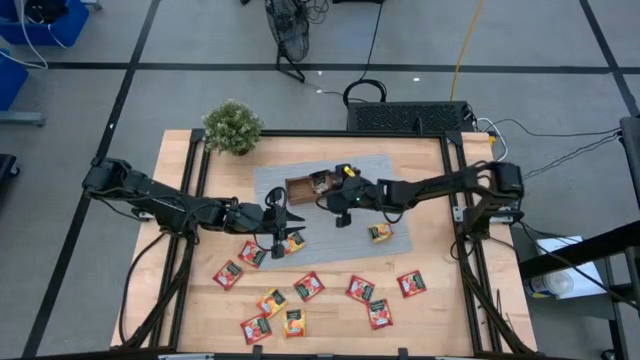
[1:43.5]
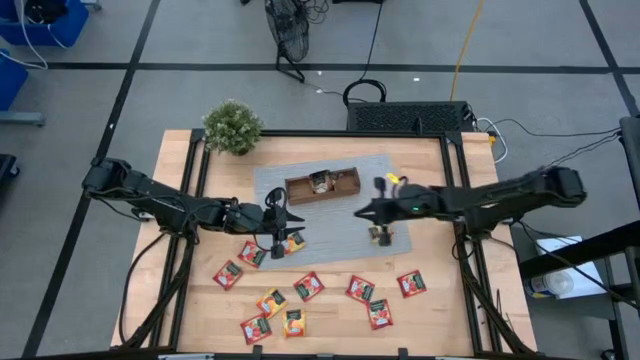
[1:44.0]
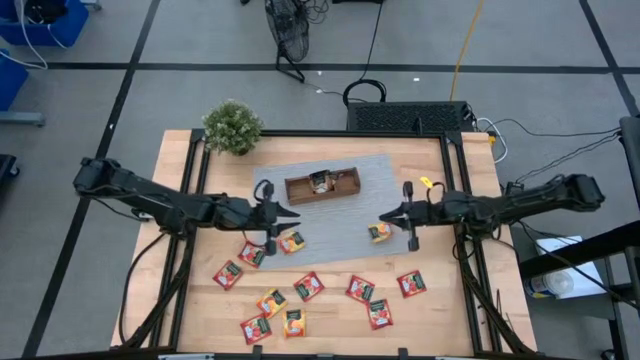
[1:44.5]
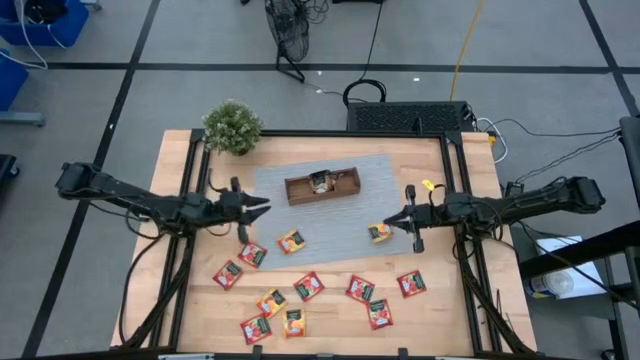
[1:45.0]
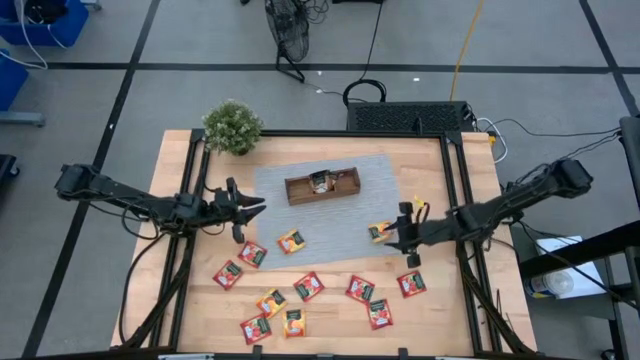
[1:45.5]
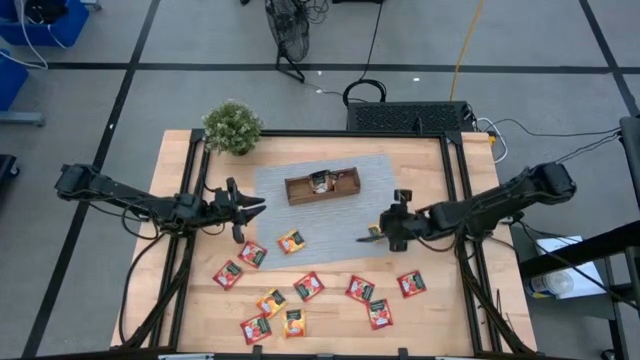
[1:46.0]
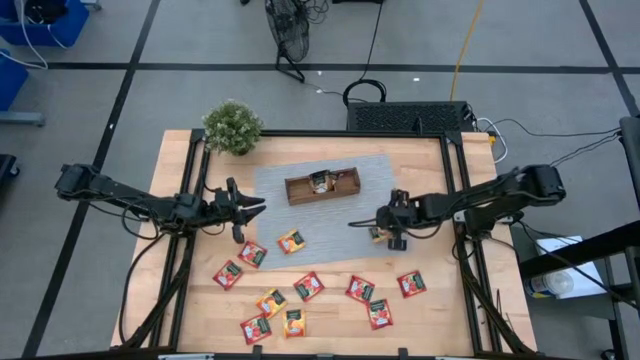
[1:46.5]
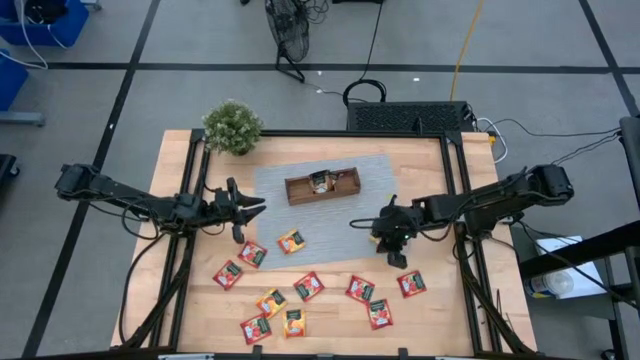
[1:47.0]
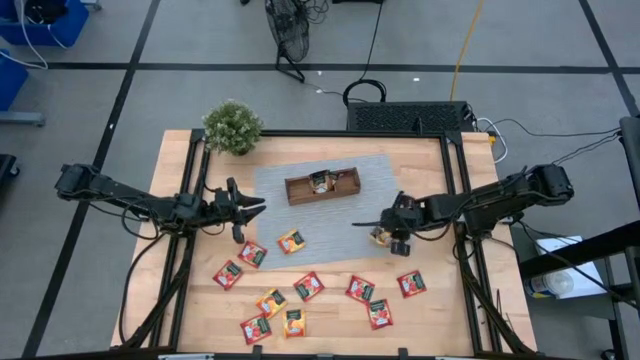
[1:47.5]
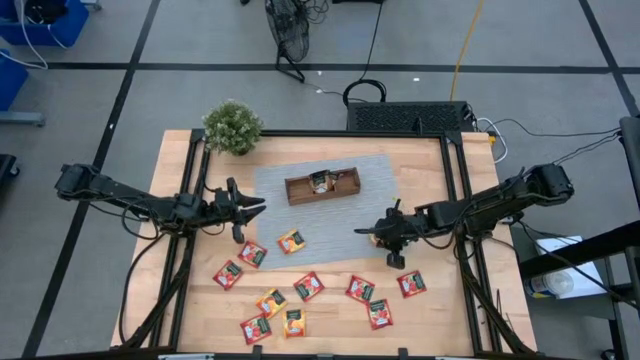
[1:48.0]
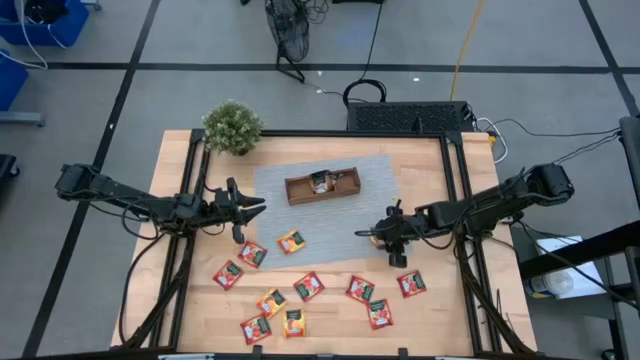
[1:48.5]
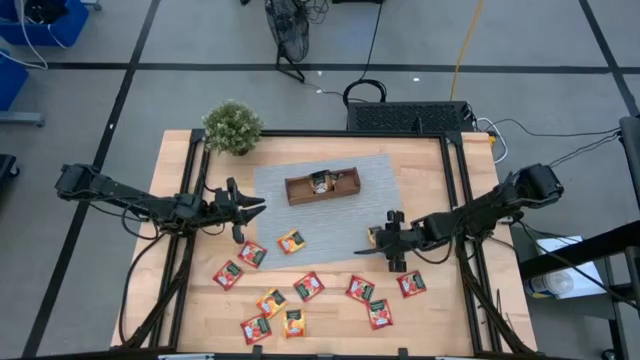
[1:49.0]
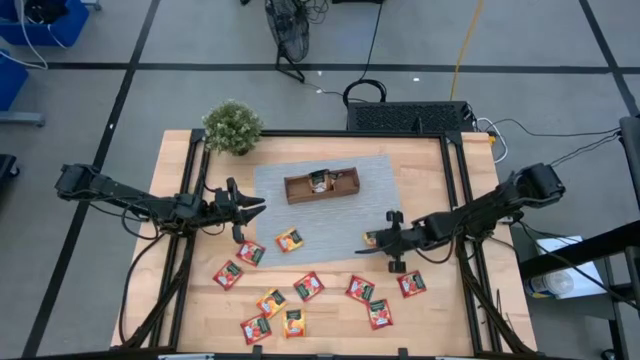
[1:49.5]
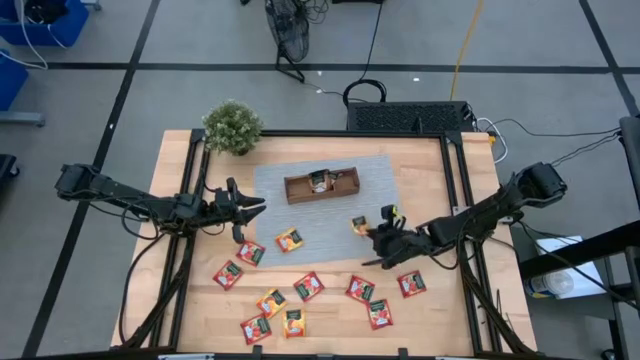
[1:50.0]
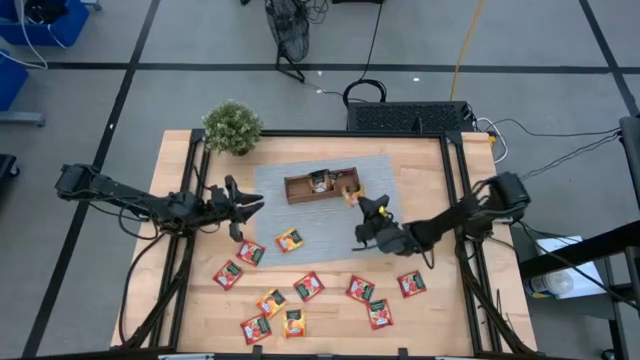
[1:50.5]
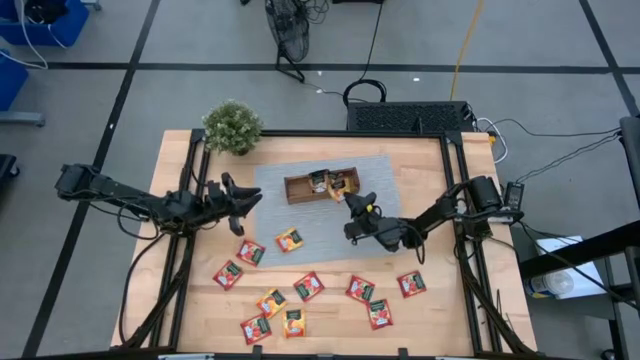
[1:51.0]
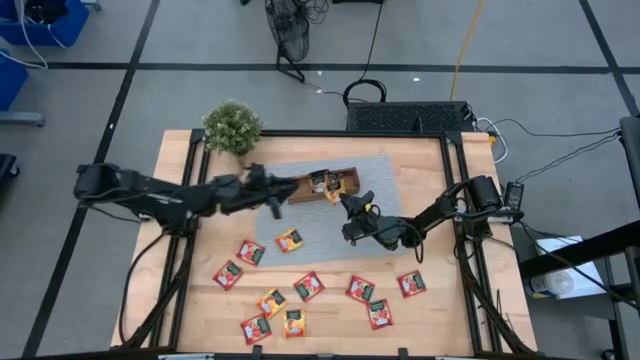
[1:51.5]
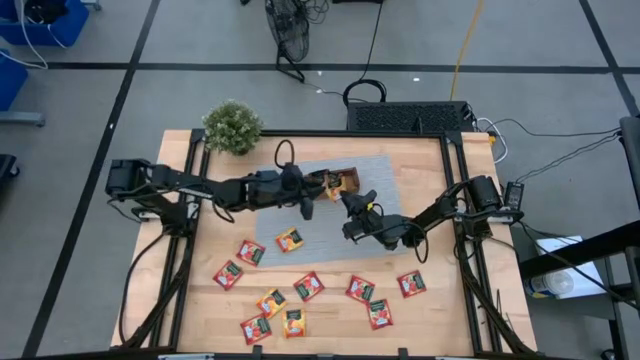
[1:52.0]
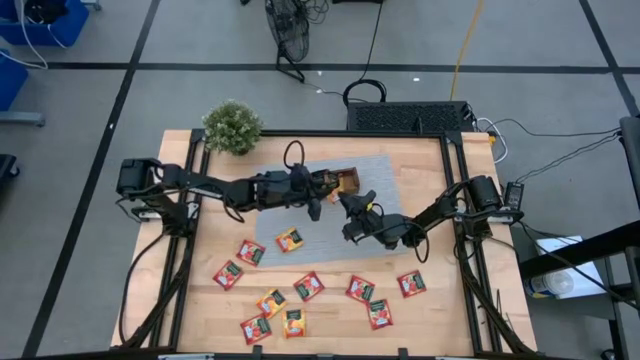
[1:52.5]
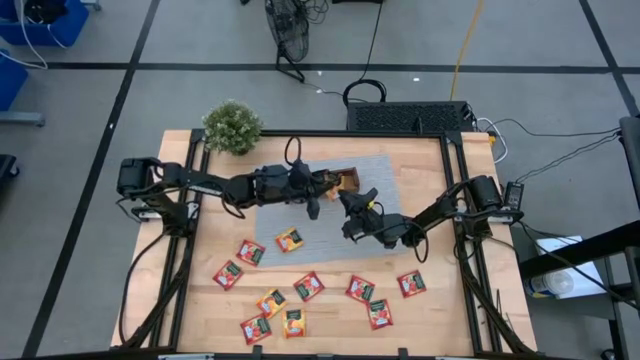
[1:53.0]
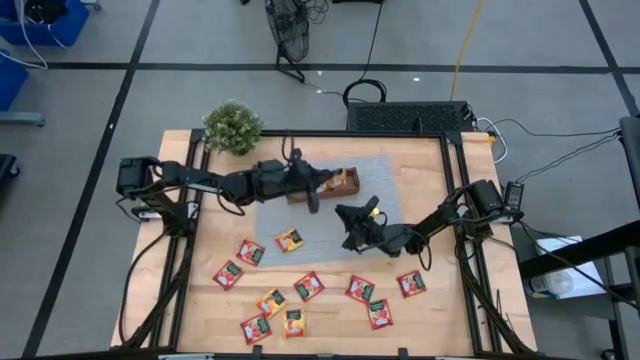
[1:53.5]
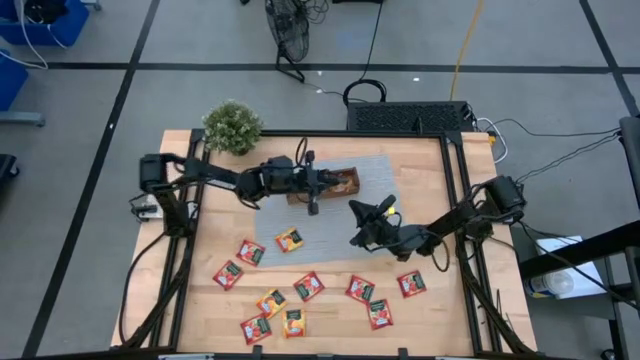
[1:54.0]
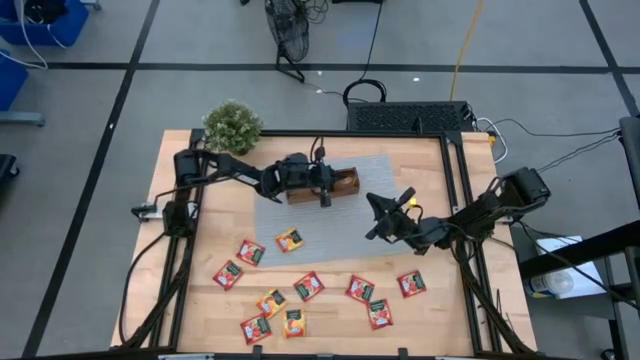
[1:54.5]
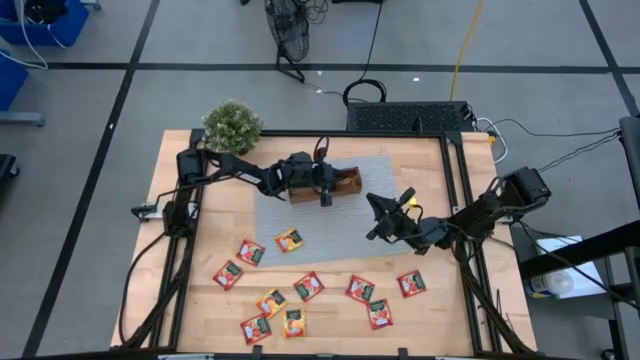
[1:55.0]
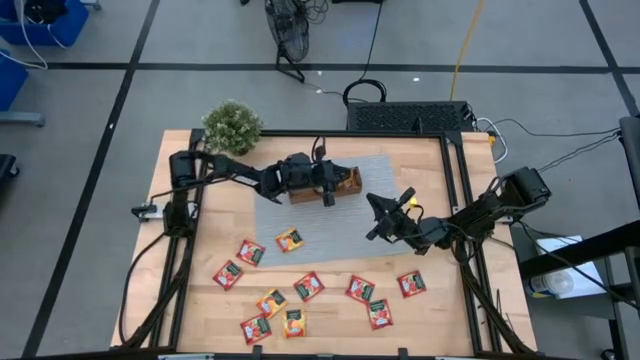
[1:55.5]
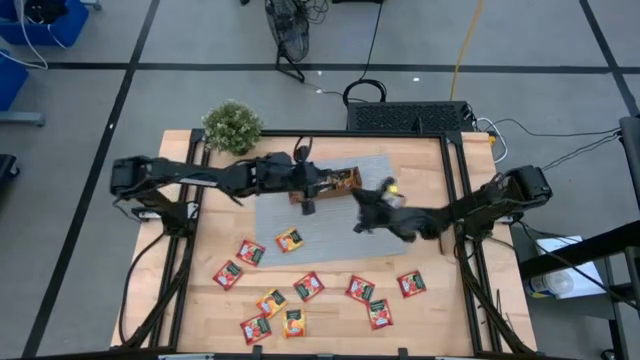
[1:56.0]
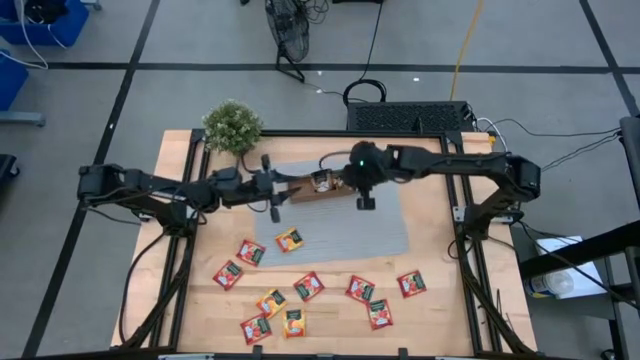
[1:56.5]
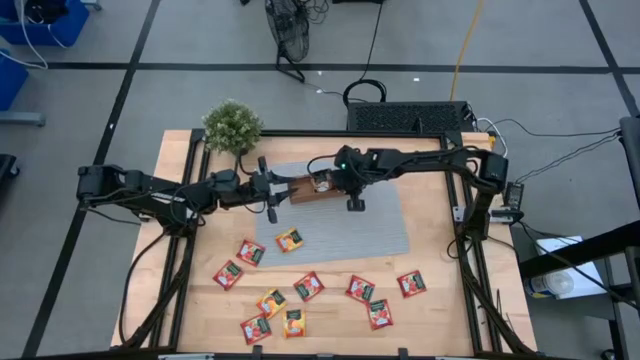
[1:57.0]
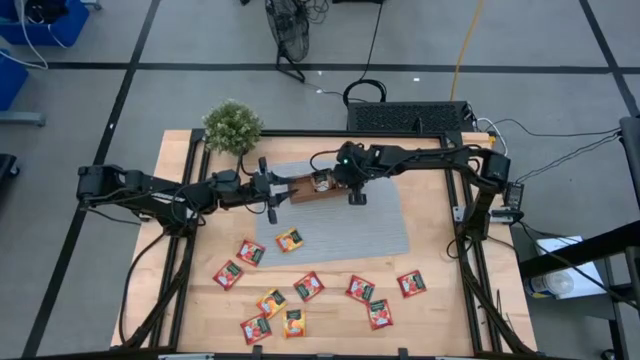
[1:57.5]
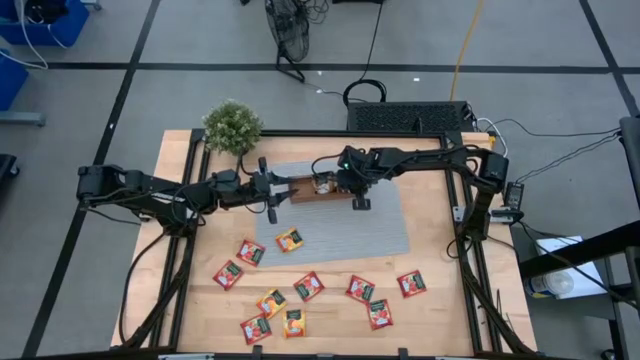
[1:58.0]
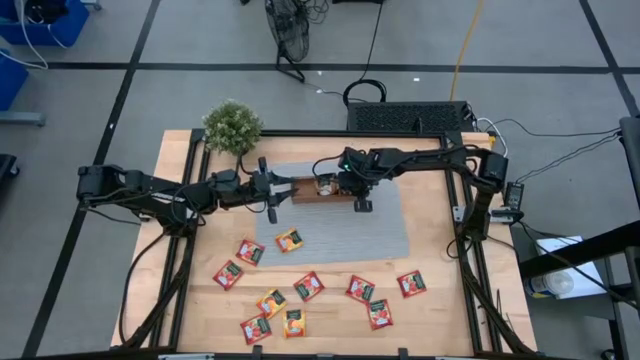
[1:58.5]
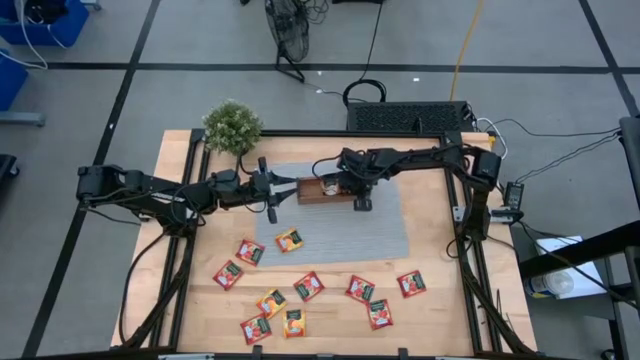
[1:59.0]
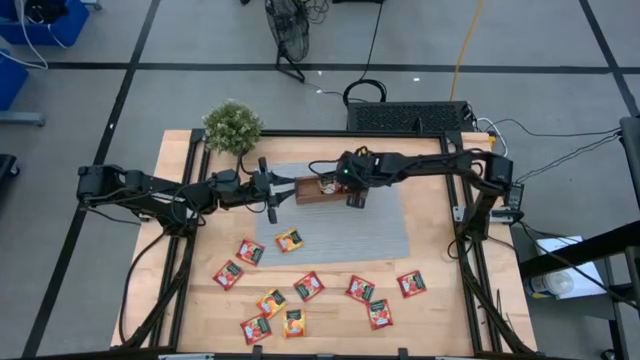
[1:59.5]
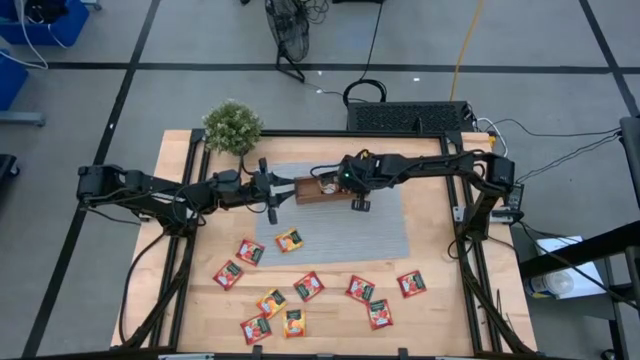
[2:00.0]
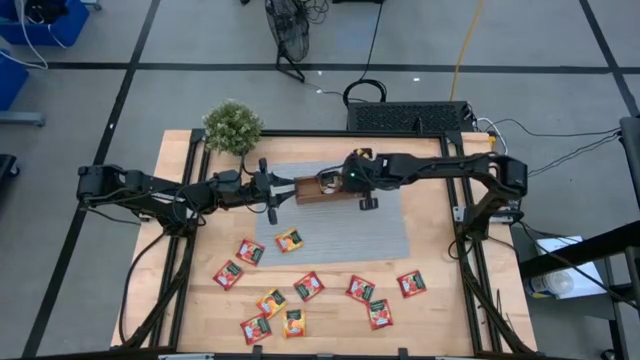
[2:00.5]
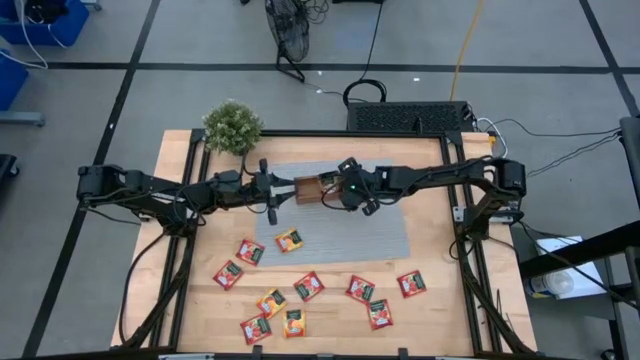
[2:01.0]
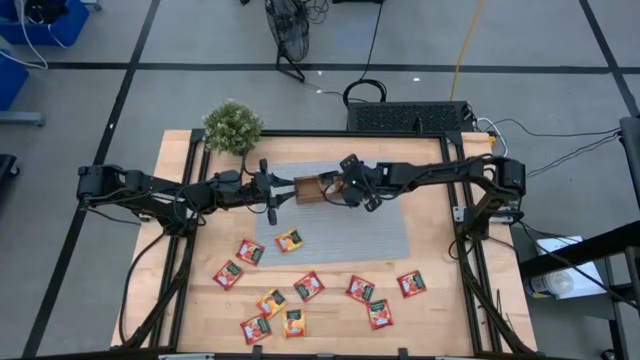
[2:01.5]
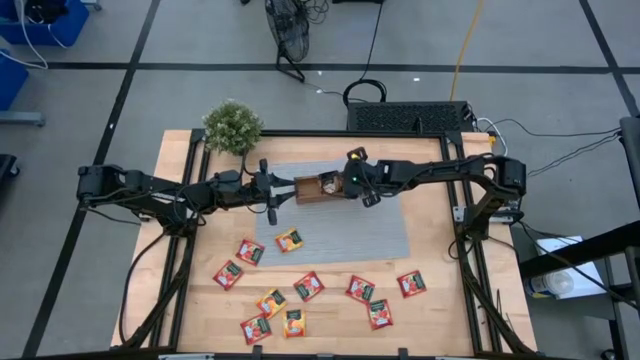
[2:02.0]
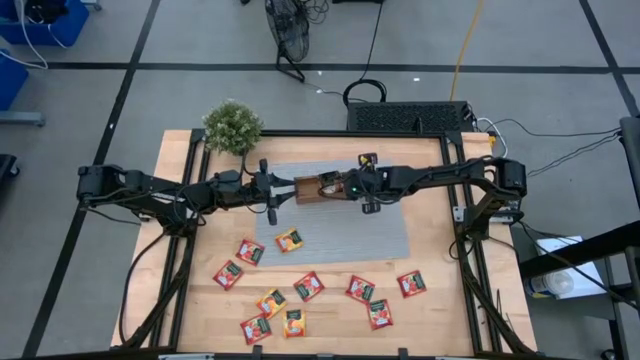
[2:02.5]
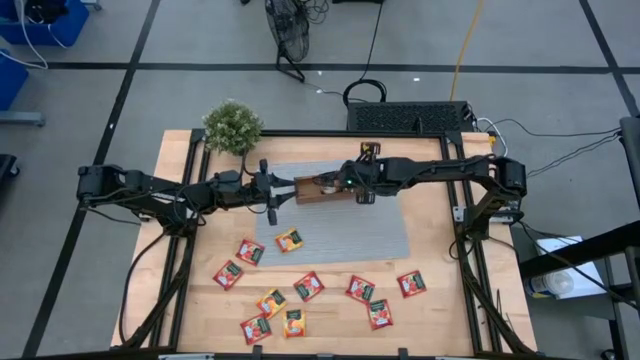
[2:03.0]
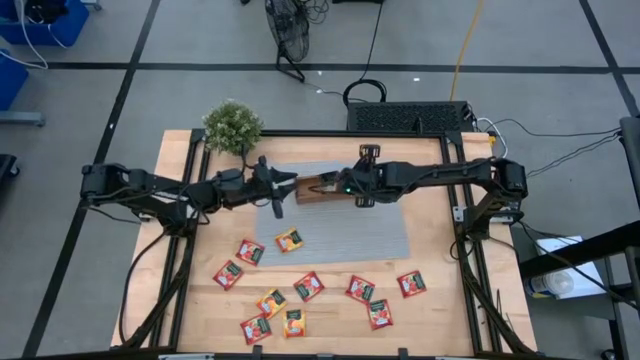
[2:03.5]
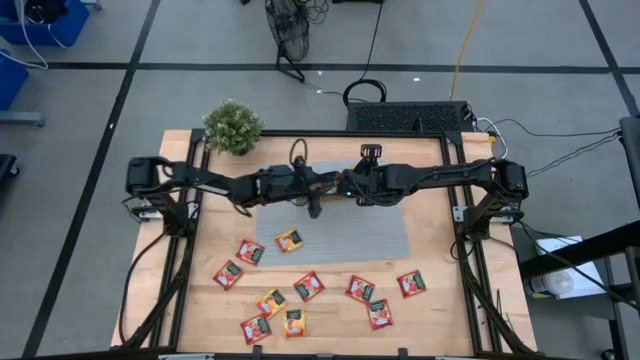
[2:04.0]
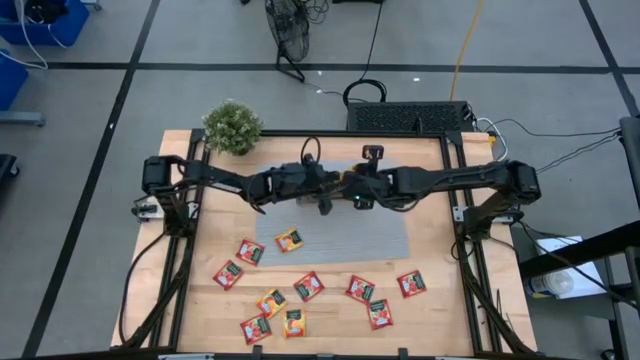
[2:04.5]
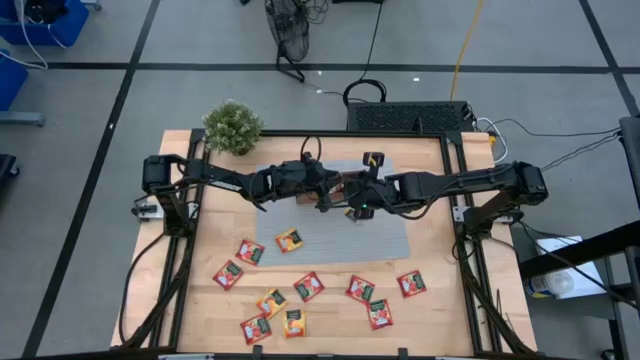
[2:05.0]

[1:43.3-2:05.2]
Task: Pick & Place Tea
Put the yellow tea bag into the right section of the wooden organizer
